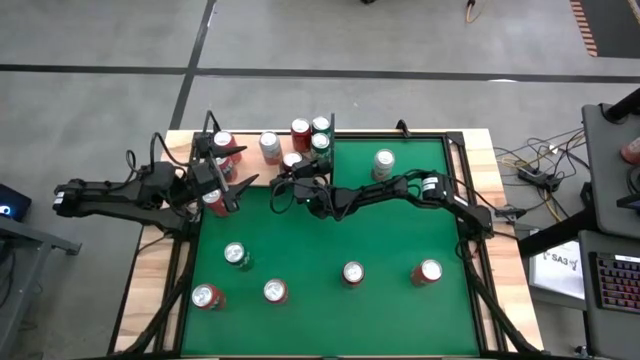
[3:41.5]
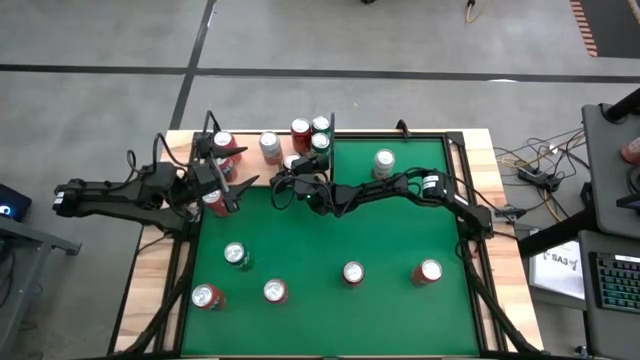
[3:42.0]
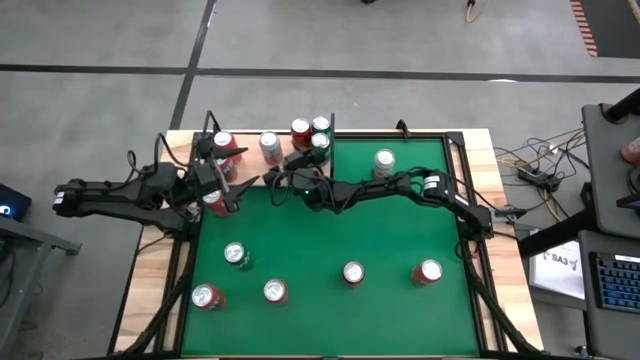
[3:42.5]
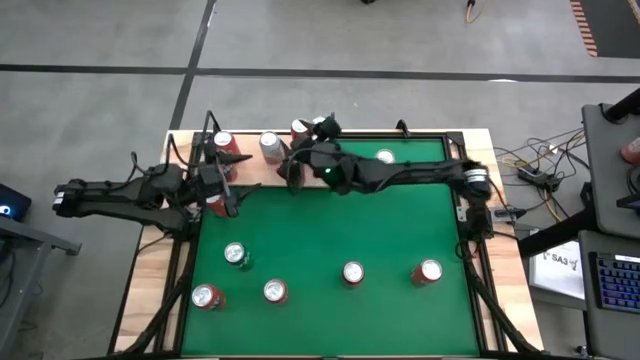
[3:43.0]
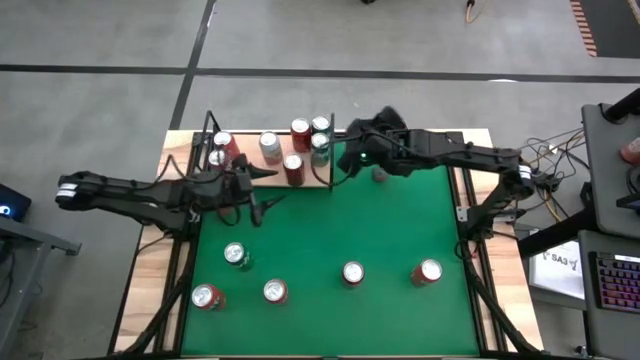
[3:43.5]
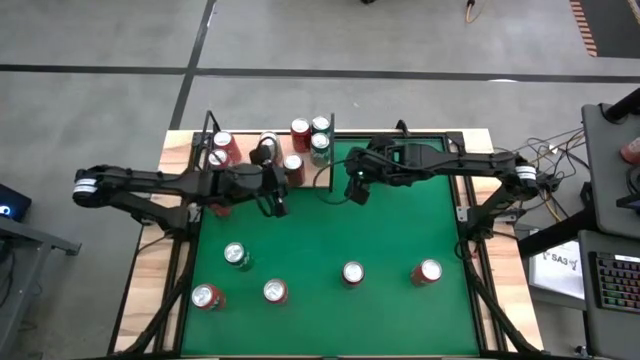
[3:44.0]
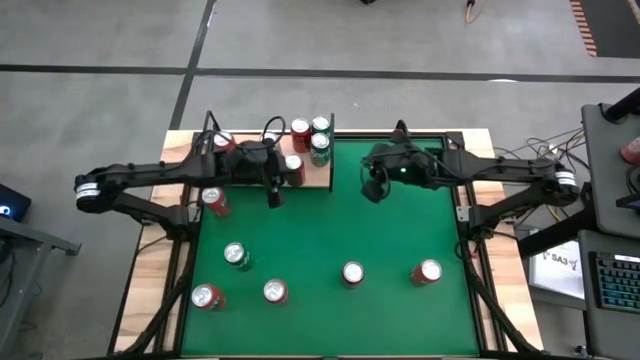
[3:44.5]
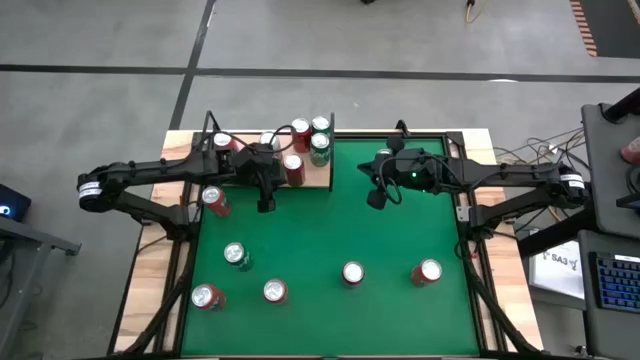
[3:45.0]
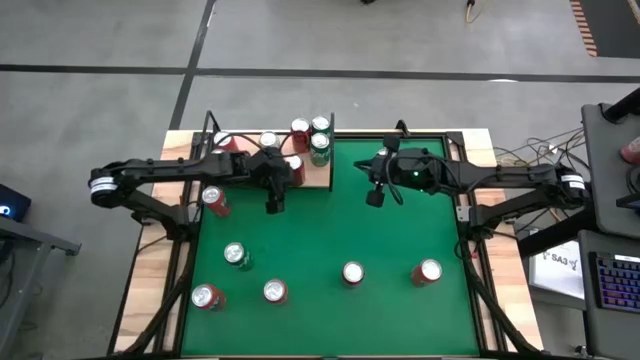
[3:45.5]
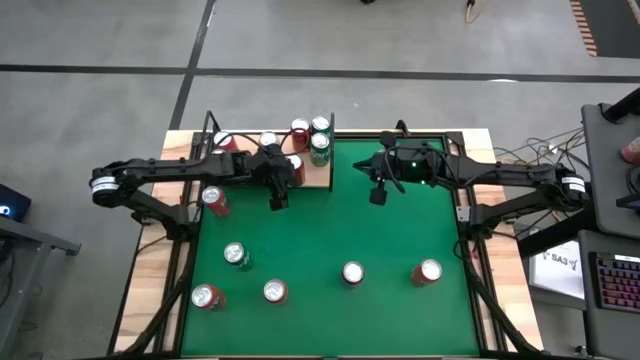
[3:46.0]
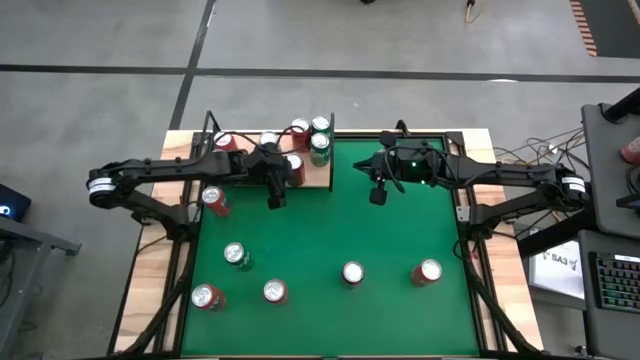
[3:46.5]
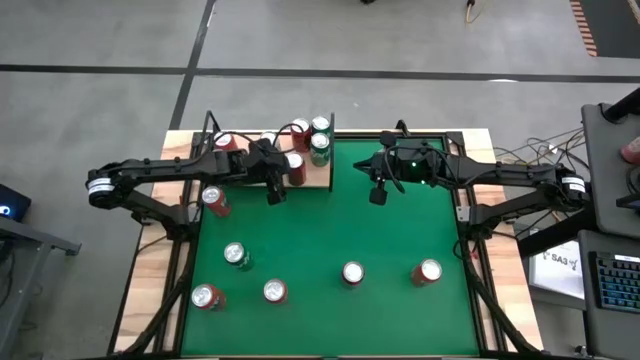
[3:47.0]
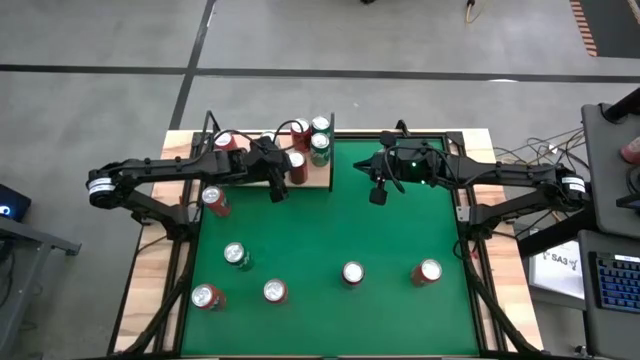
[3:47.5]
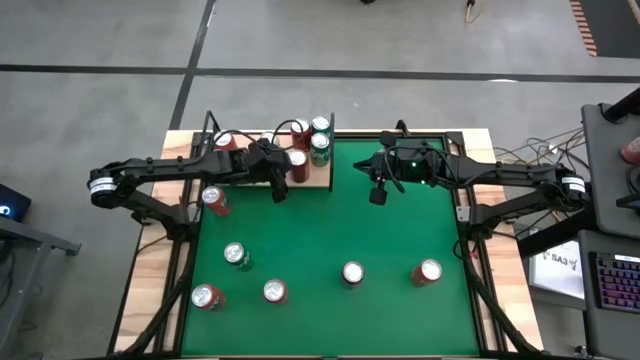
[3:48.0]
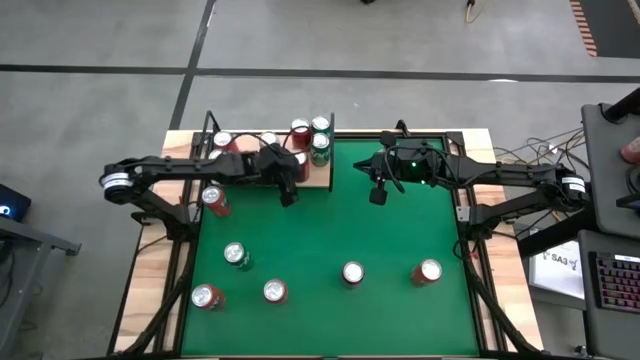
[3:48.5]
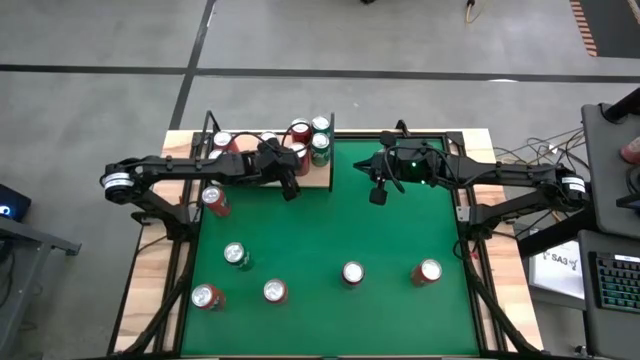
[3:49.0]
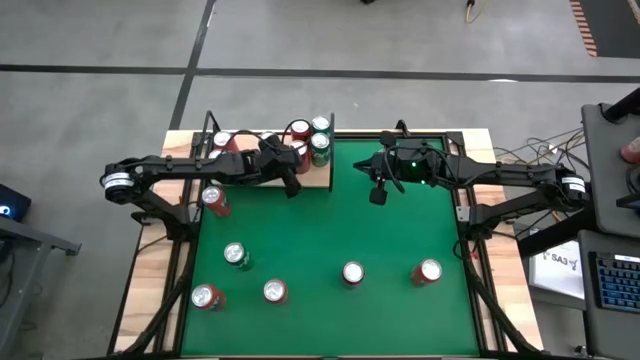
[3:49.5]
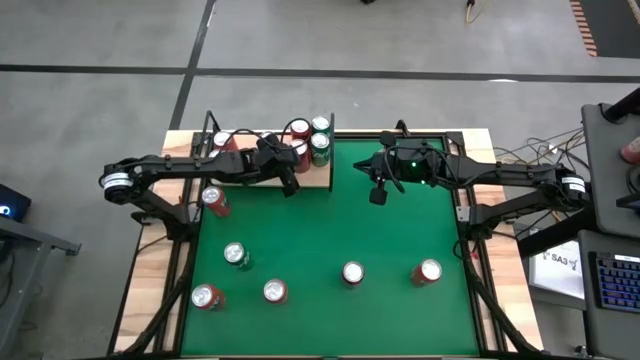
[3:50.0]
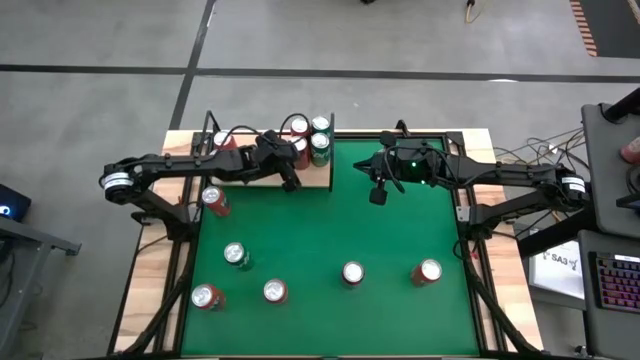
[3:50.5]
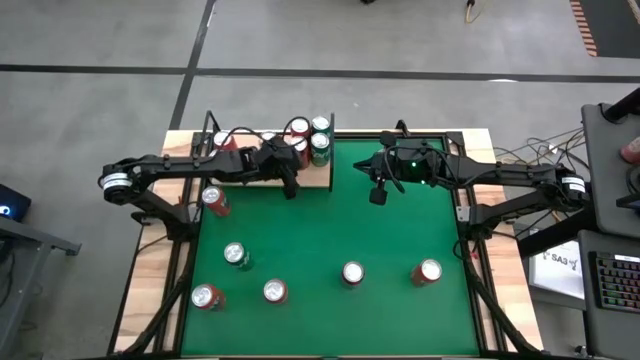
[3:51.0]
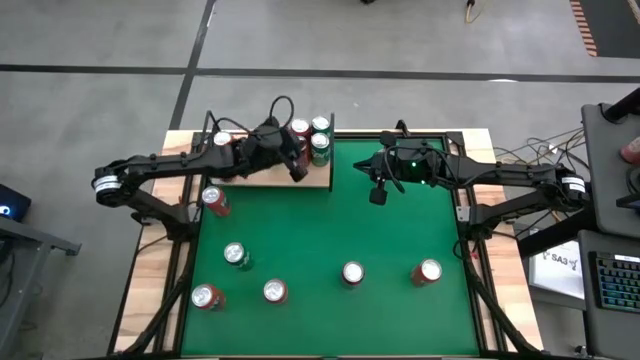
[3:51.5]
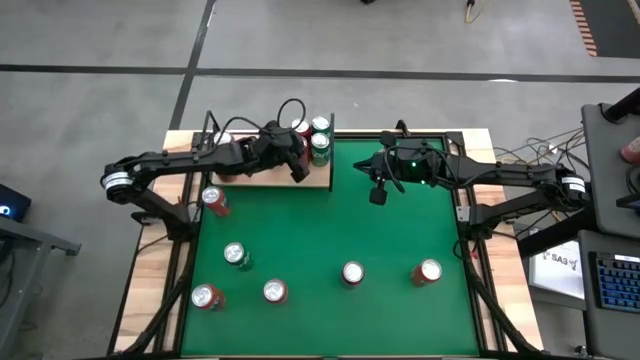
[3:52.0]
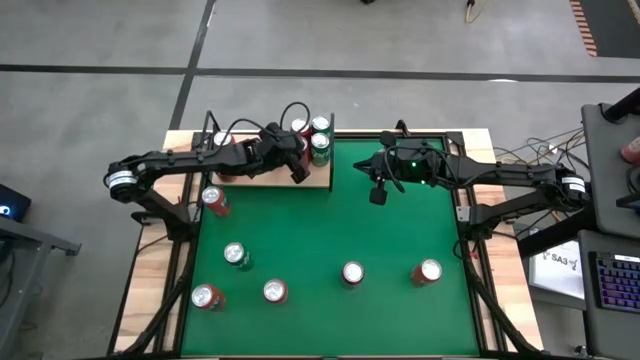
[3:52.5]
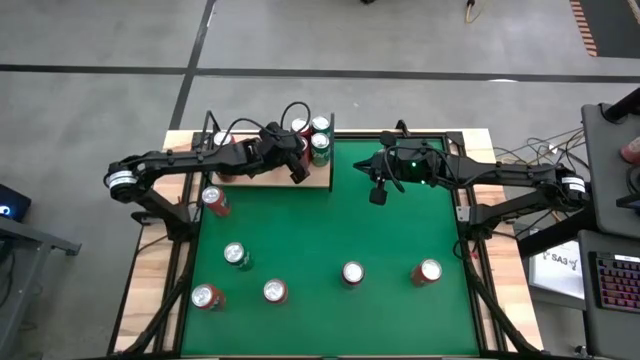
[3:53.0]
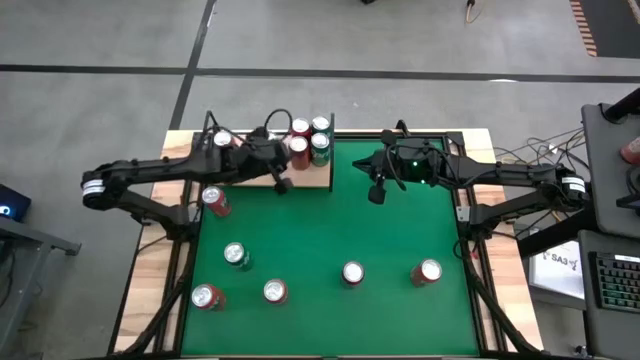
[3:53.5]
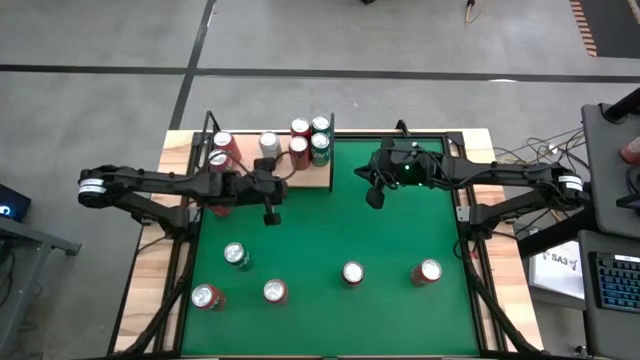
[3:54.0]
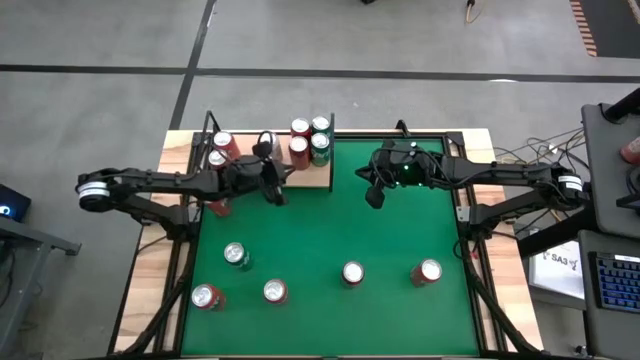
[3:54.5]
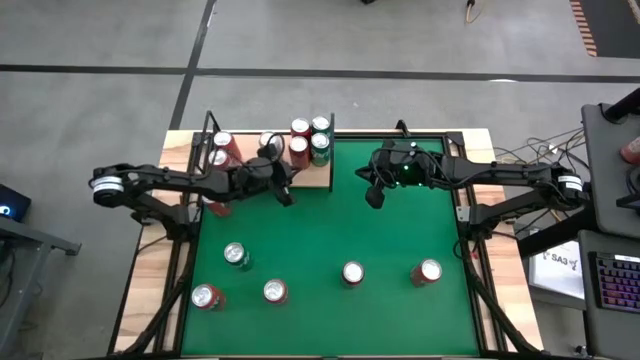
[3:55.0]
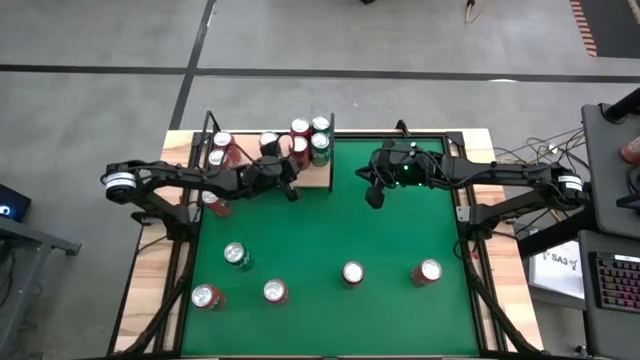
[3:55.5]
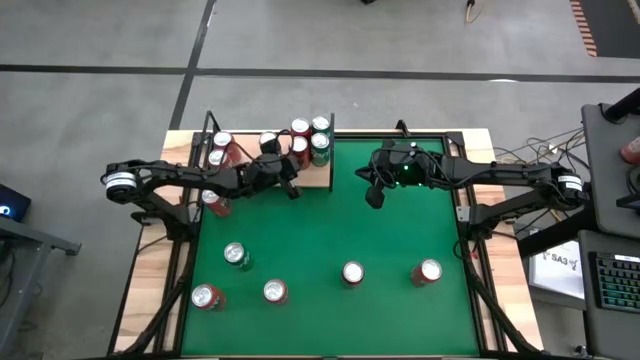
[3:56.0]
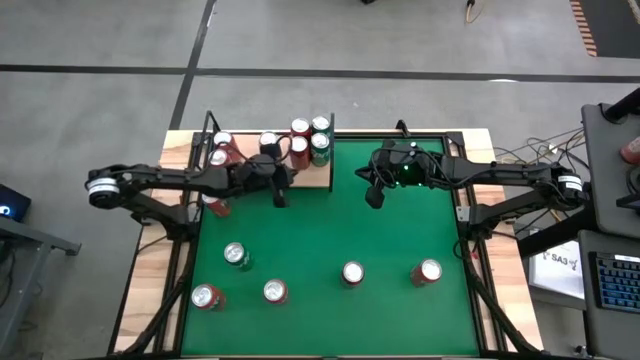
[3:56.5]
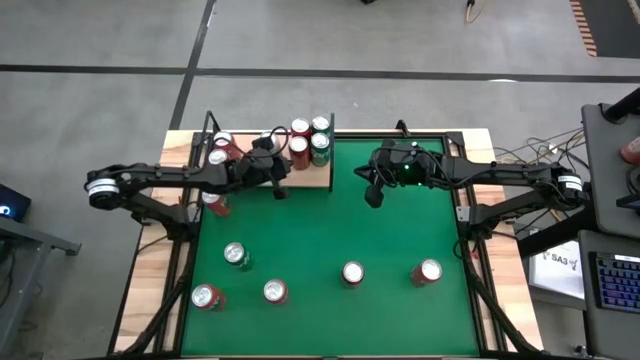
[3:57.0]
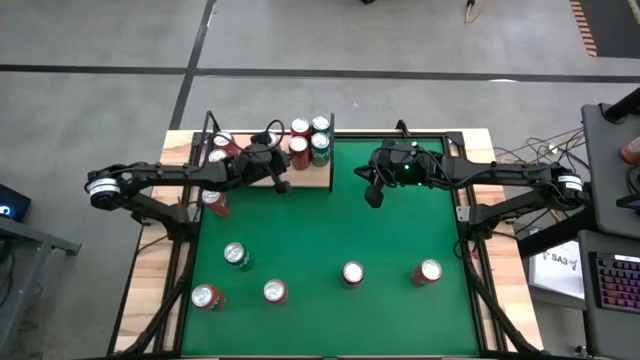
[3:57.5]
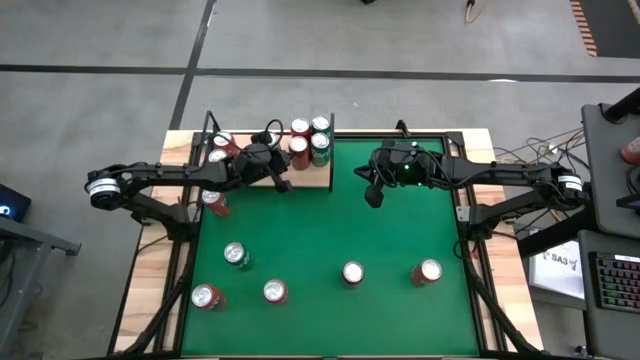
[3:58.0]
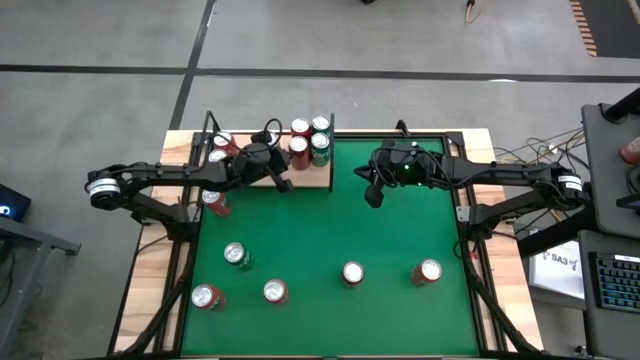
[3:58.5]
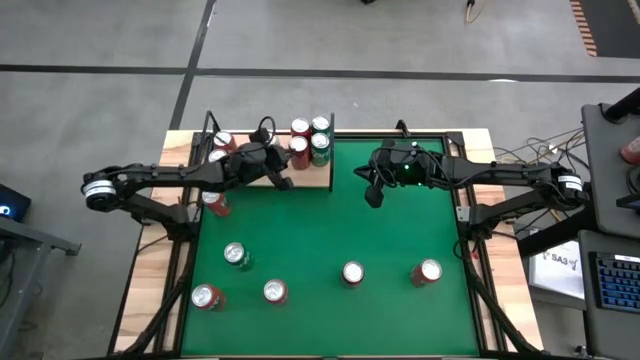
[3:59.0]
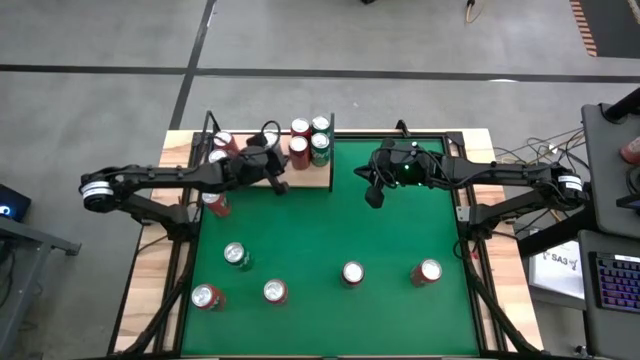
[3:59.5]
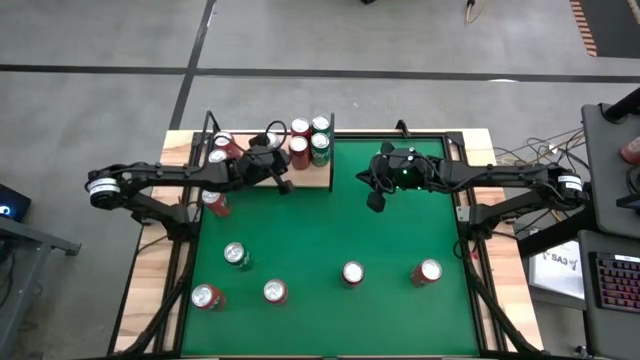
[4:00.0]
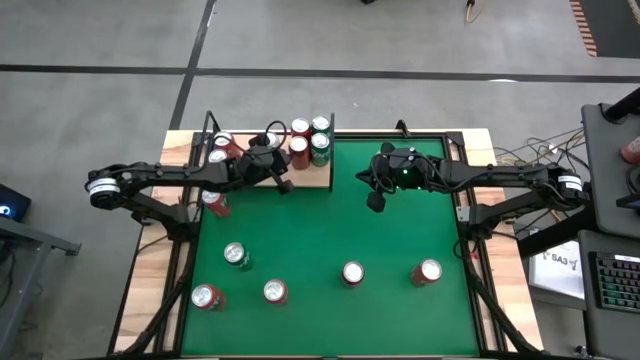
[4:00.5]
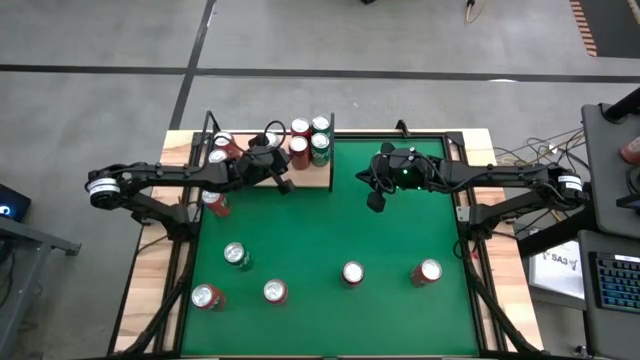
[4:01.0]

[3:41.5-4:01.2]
Task: Place canned beverage on shelf
Put the red-black soda can on the shelf aligned with the other red-black soda can
